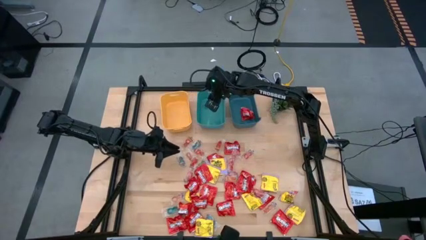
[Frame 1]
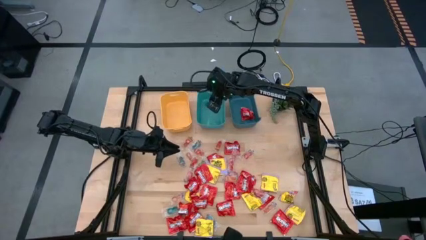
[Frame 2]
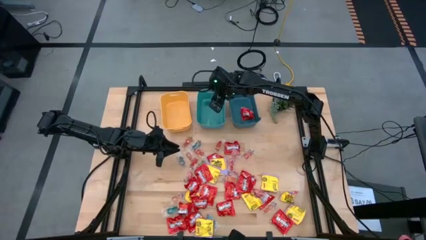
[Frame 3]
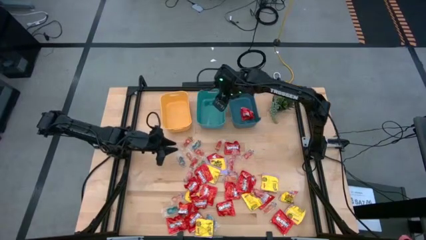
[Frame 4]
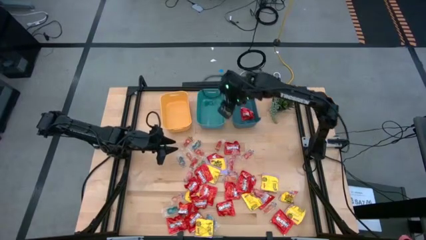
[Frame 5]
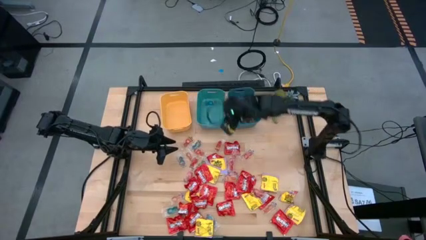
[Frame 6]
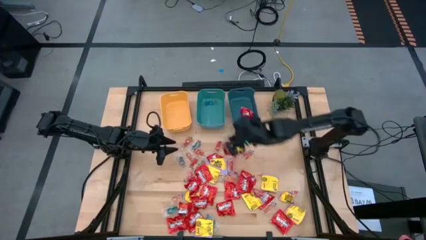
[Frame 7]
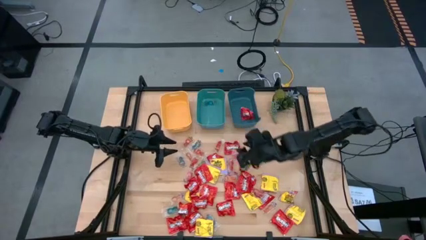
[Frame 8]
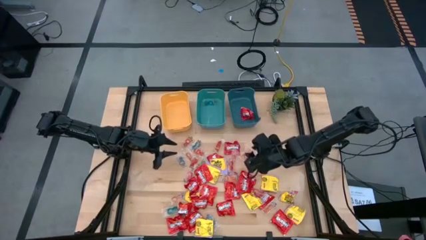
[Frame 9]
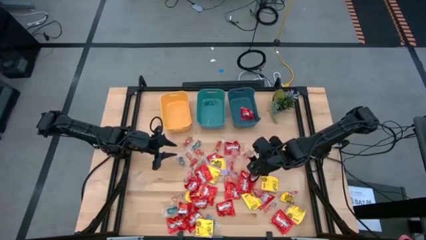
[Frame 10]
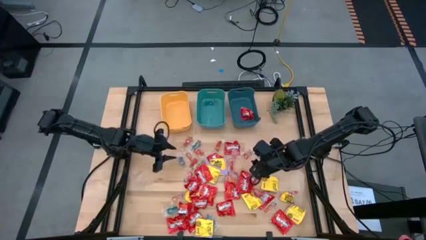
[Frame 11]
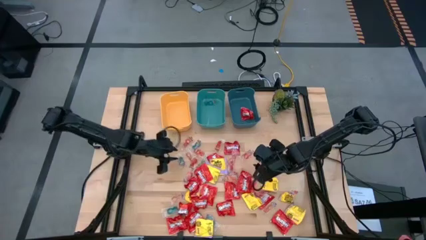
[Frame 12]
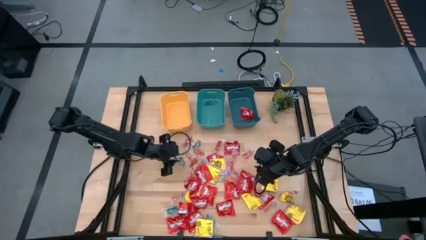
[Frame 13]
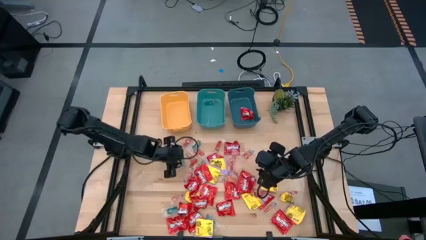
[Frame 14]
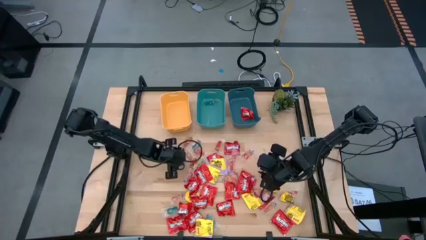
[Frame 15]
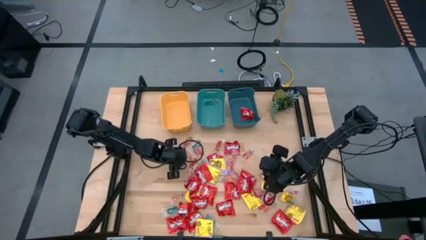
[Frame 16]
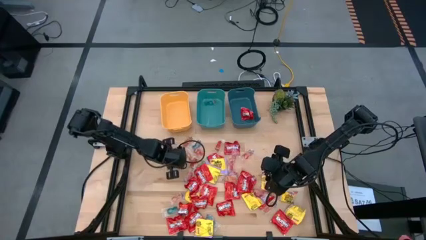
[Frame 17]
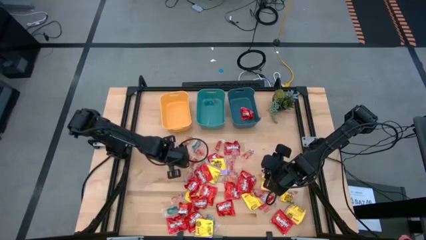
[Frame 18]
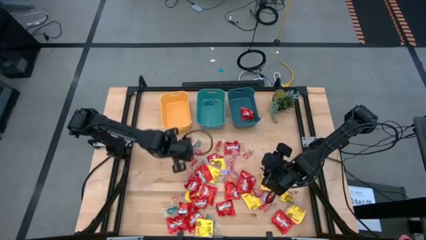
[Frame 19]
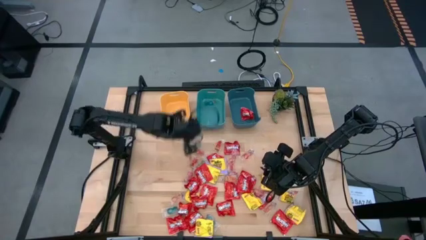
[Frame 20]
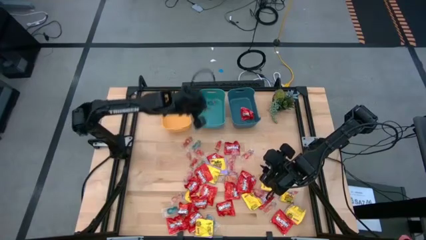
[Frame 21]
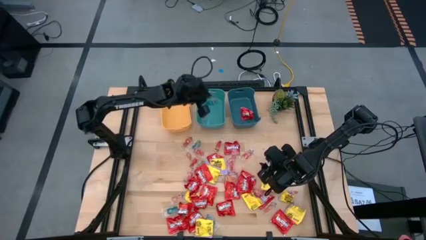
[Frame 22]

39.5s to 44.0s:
Task: Sort candy
Put the blue gummy candy into the green bin

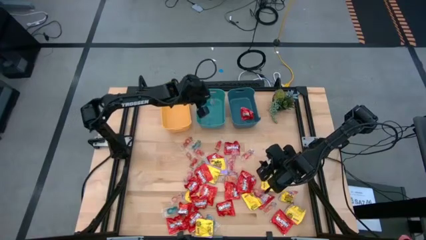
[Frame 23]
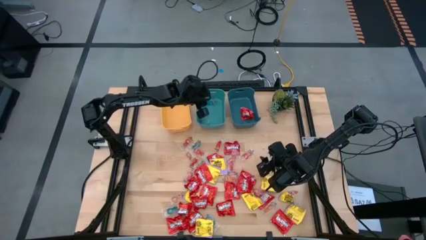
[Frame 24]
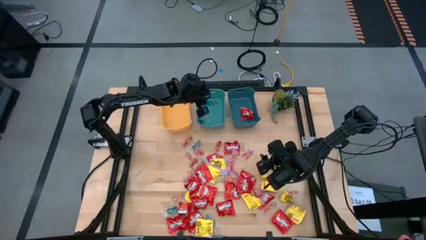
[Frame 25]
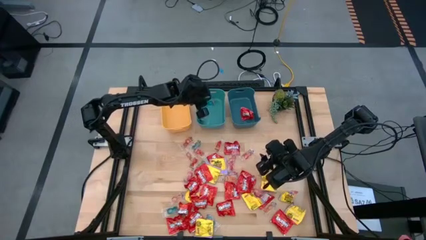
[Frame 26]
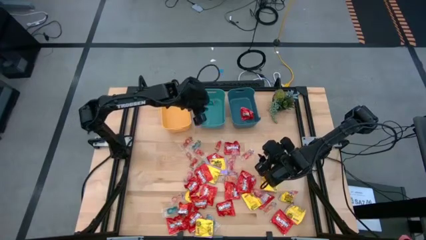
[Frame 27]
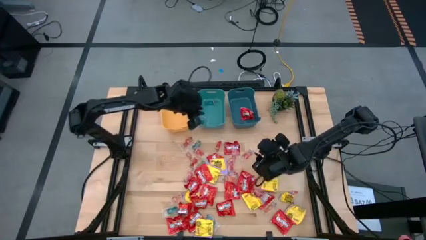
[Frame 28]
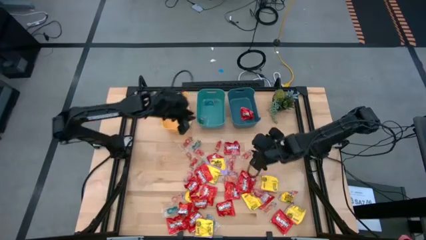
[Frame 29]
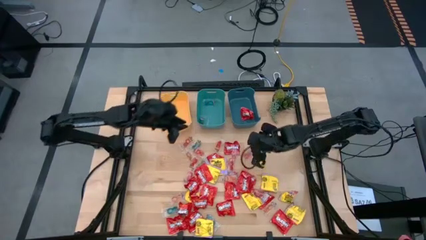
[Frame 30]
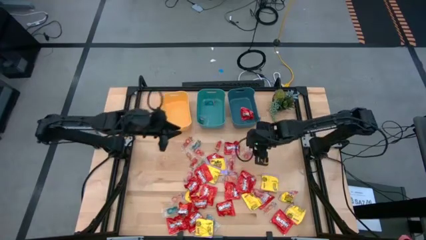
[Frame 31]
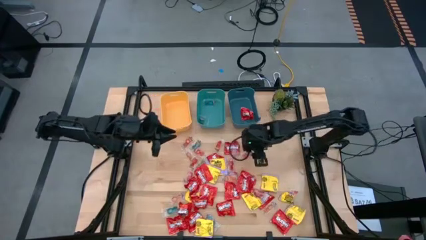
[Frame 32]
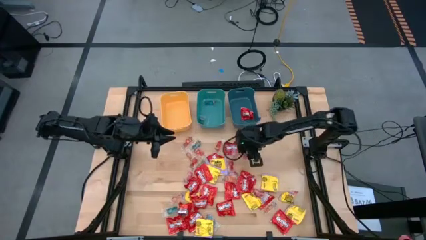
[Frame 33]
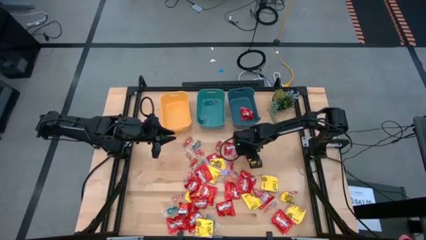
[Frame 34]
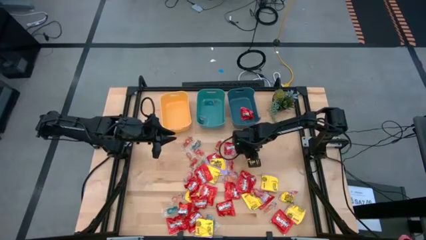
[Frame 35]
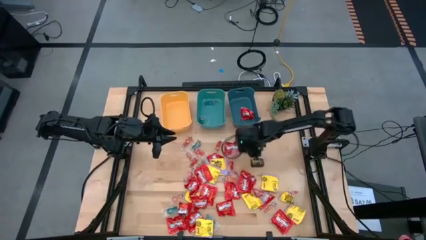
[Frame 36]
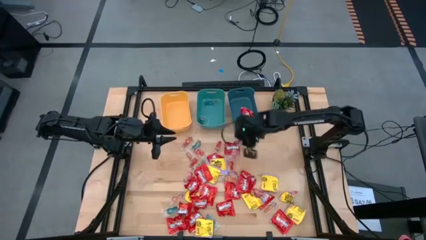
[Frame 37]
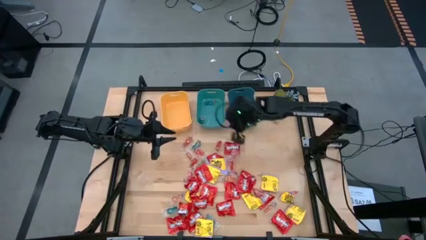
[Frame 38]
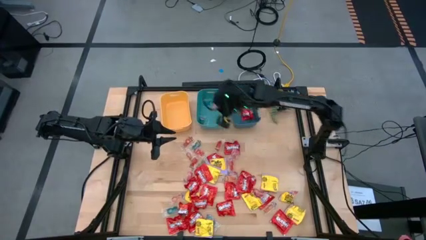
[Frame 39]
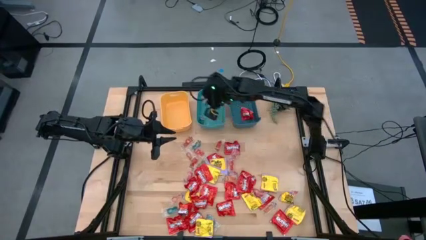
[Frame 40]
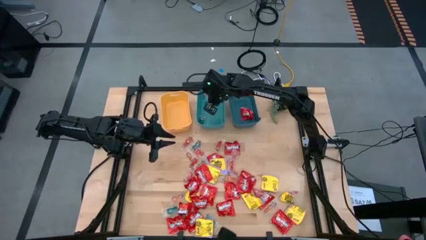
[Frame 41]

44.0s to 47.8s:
Put the orange gummy candy into the green bin

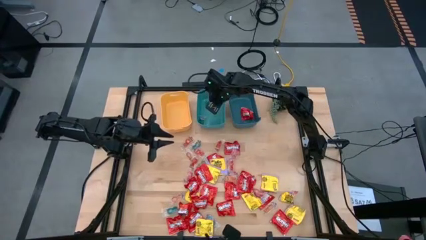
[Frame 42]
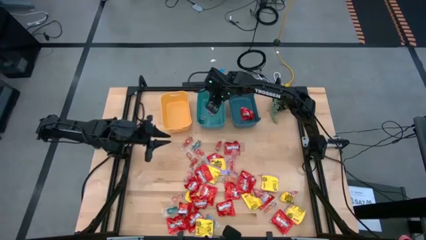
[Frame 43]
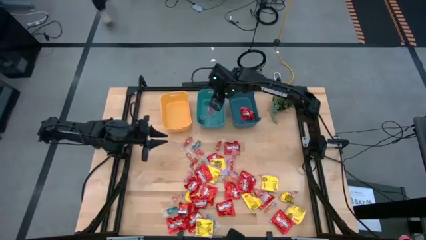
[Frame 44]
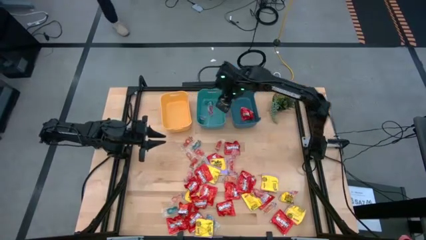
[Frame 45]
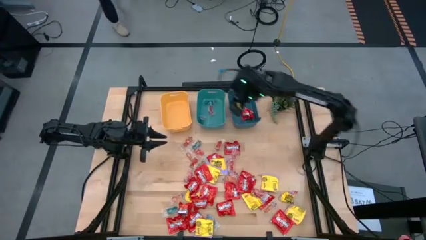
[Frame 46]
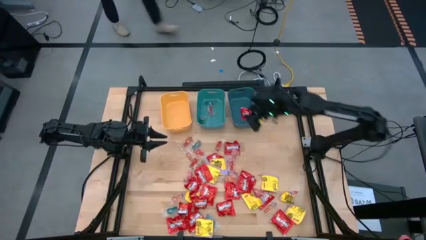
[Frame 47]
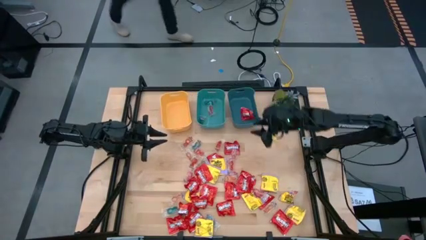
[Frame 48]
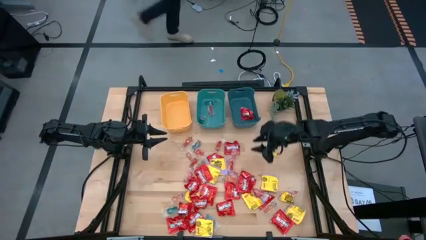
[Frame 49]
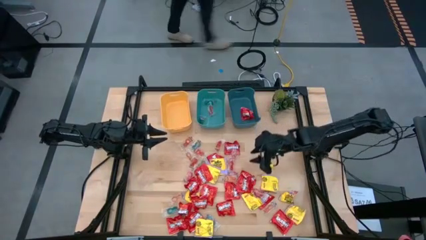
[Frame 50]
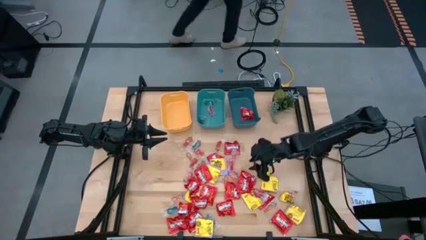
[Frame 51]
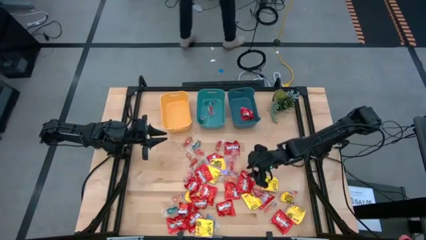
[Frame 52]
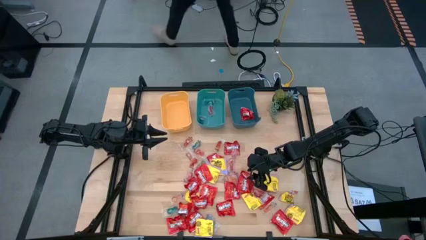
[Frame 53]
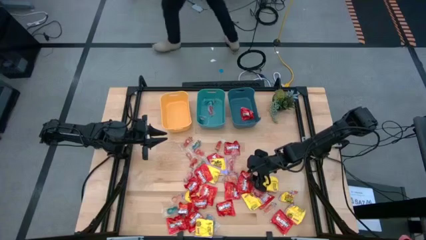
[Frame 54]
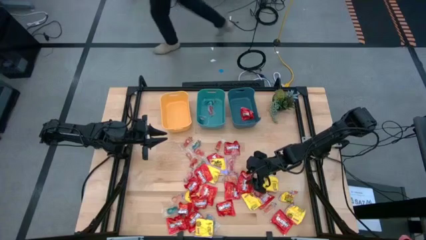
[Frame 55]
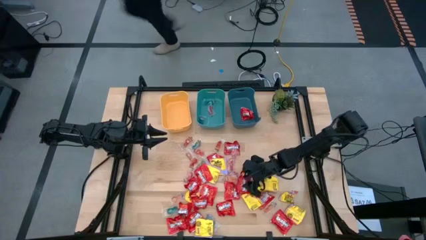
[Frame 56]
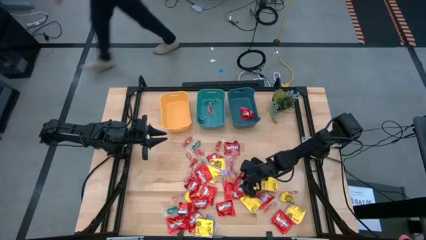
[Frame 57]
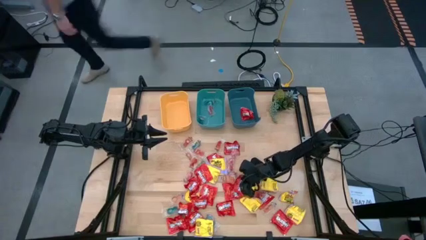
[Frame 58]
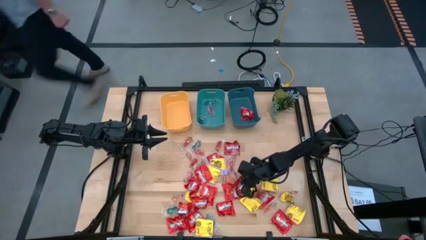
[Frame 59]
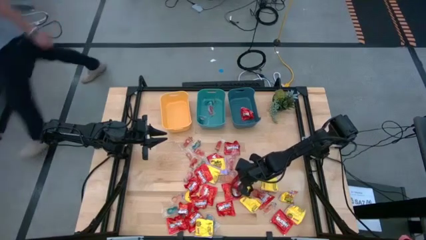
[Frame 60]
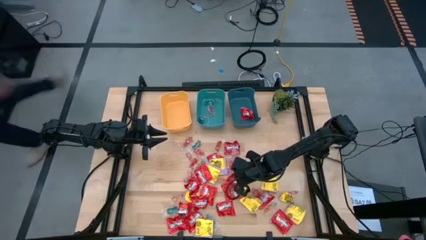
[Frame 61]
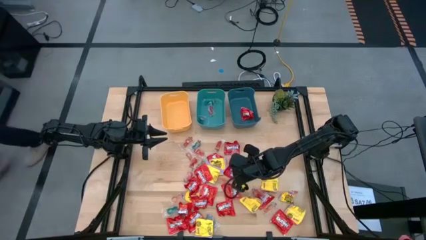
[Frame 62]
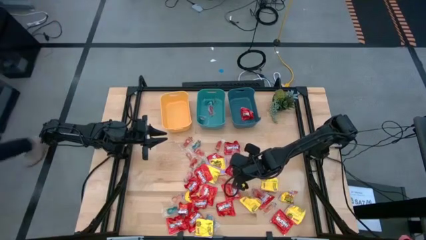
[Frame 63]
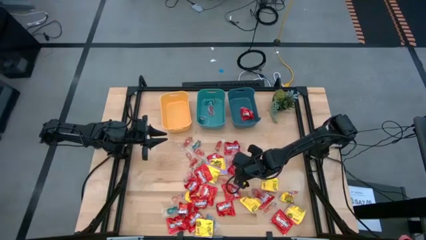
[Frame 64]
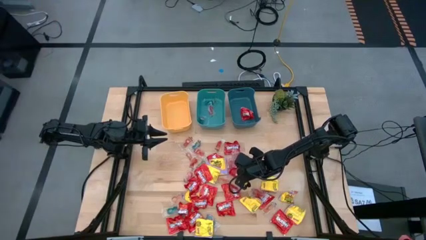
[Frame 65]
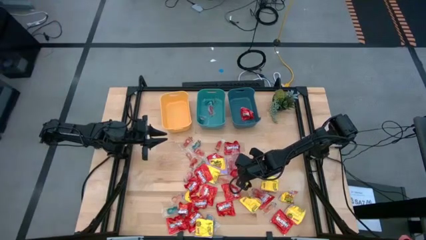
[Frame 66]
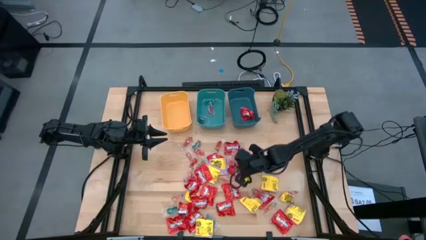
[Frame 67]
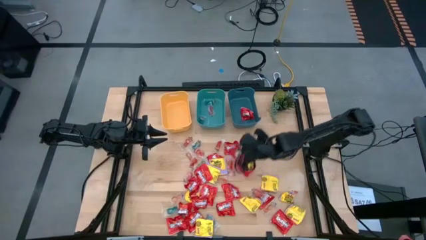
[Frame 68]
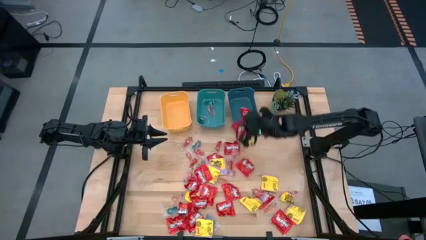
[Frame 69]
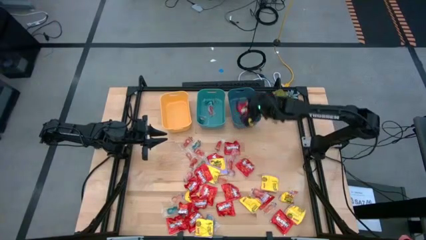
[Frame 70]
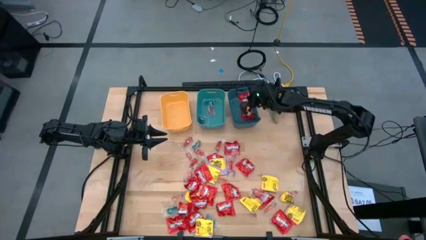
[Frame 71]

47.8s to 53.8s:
Put the red candy into the blue bin
